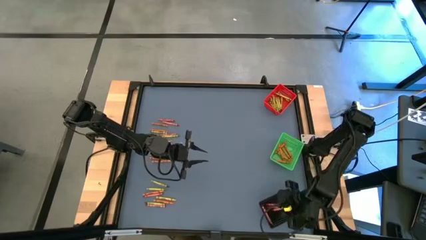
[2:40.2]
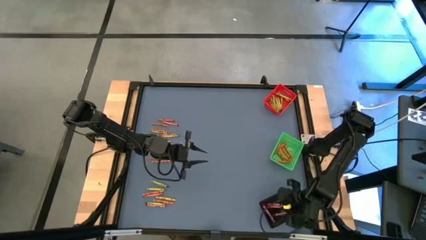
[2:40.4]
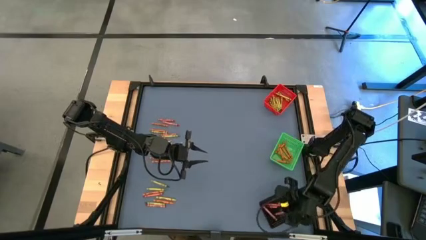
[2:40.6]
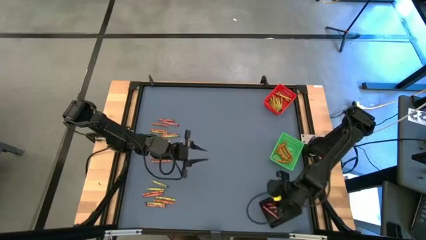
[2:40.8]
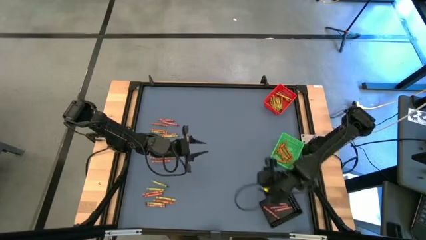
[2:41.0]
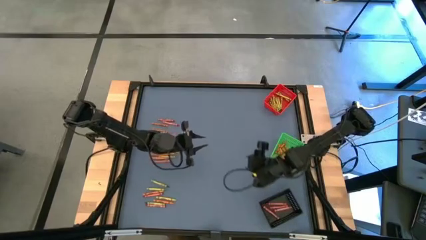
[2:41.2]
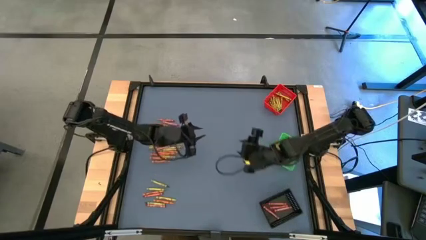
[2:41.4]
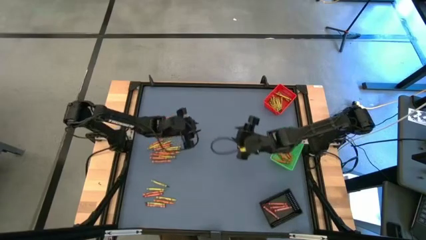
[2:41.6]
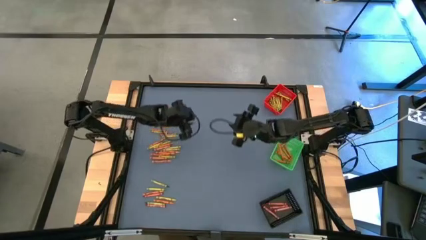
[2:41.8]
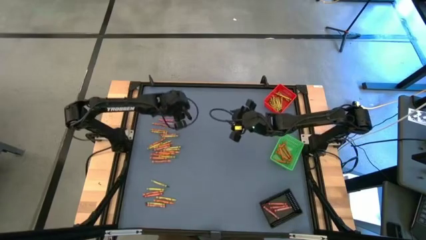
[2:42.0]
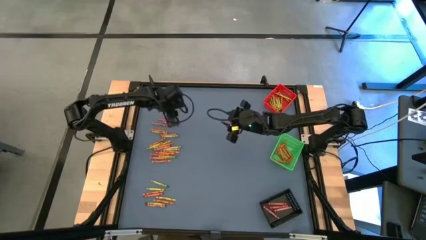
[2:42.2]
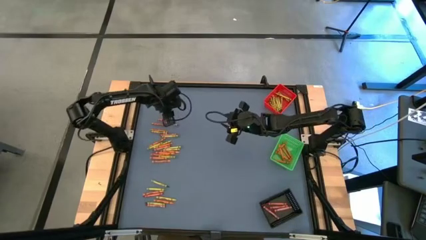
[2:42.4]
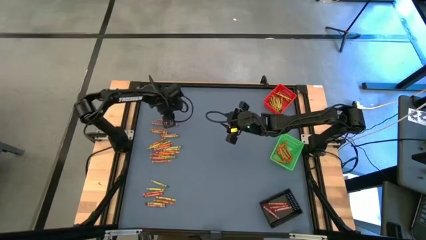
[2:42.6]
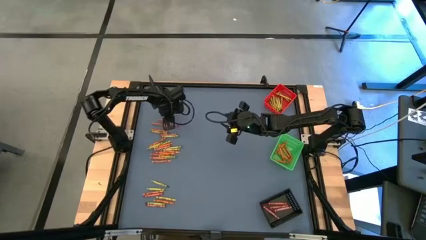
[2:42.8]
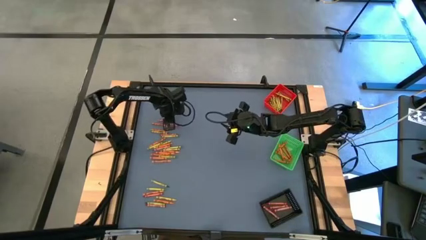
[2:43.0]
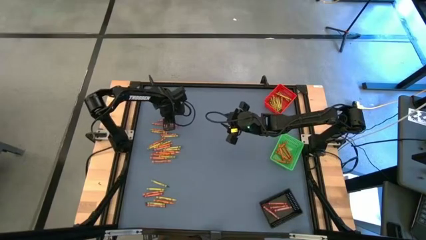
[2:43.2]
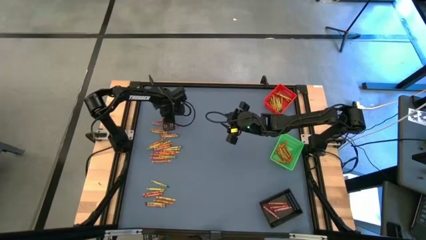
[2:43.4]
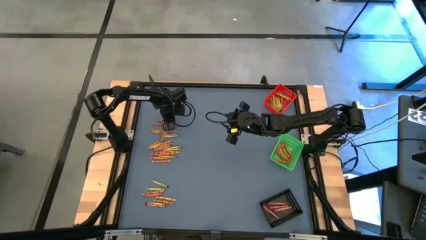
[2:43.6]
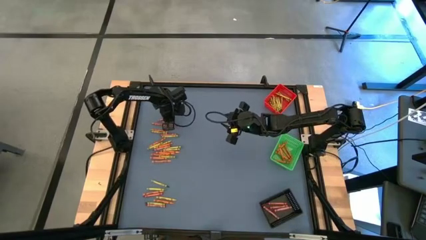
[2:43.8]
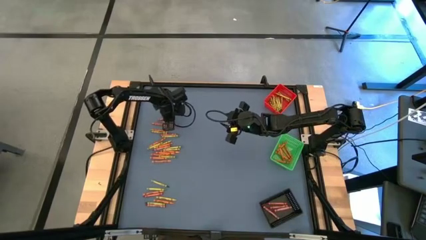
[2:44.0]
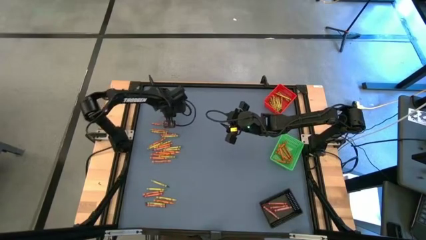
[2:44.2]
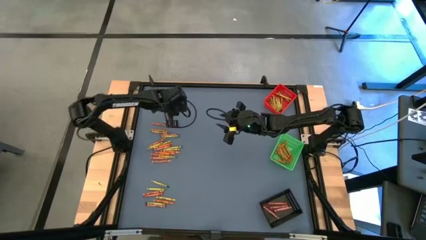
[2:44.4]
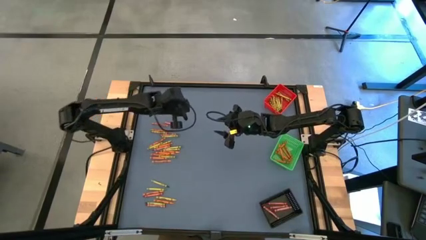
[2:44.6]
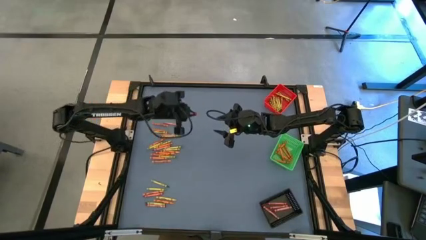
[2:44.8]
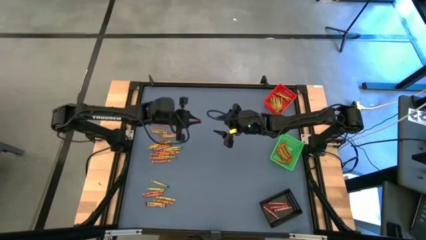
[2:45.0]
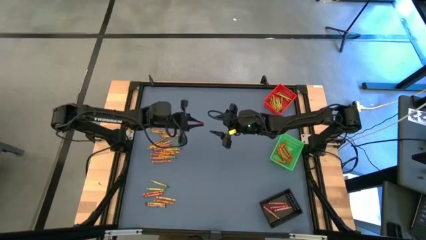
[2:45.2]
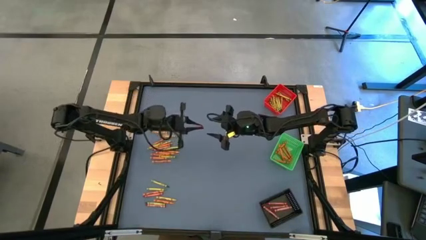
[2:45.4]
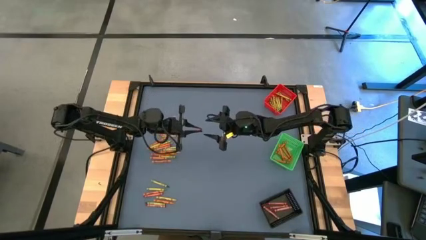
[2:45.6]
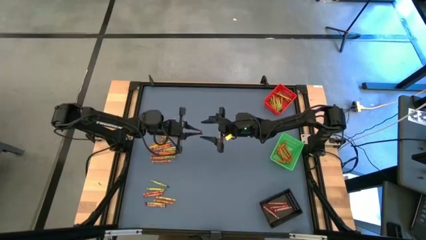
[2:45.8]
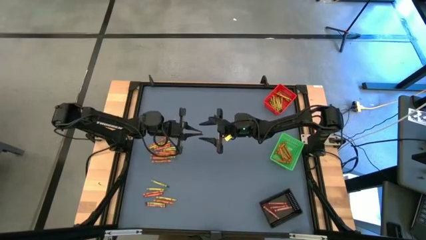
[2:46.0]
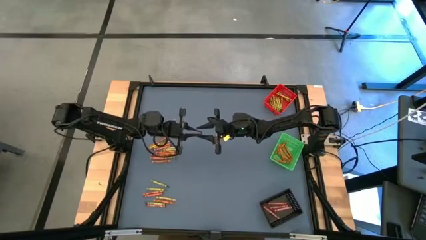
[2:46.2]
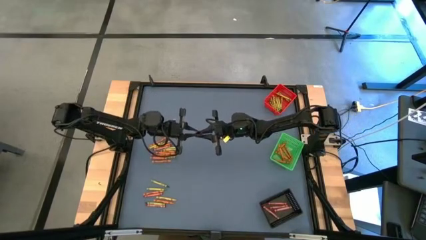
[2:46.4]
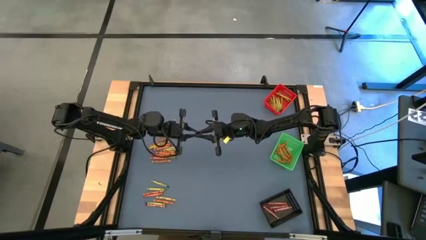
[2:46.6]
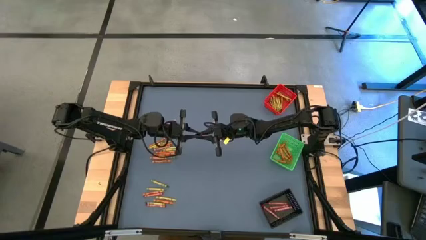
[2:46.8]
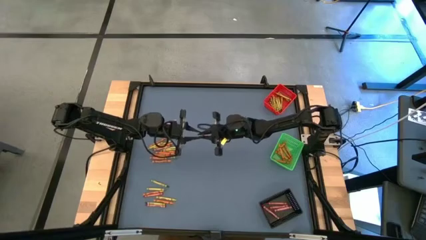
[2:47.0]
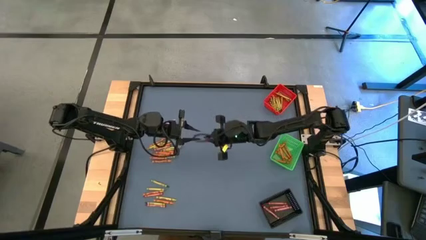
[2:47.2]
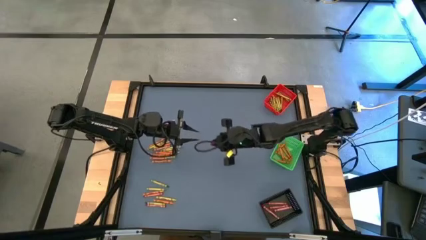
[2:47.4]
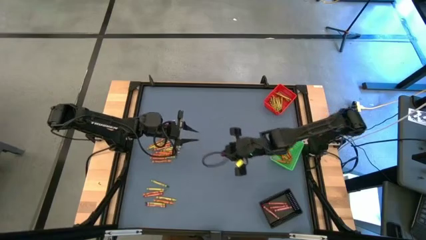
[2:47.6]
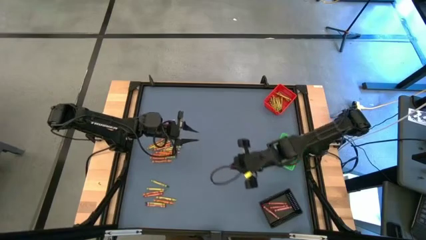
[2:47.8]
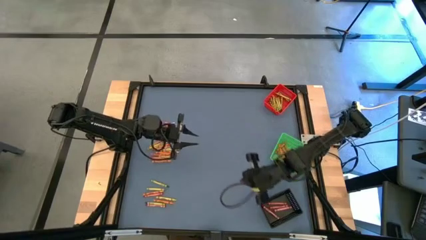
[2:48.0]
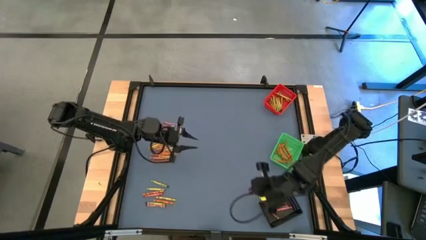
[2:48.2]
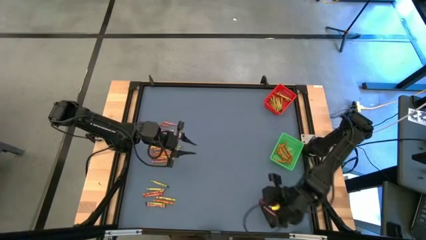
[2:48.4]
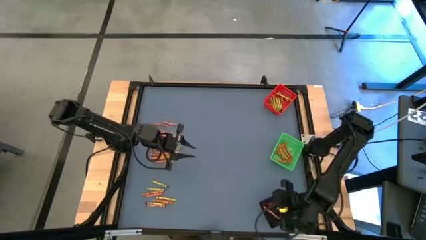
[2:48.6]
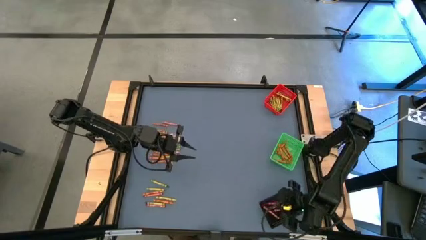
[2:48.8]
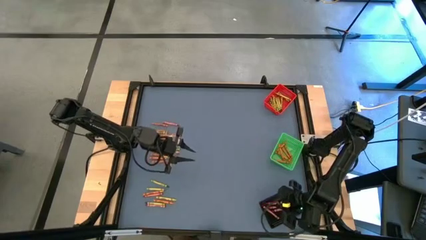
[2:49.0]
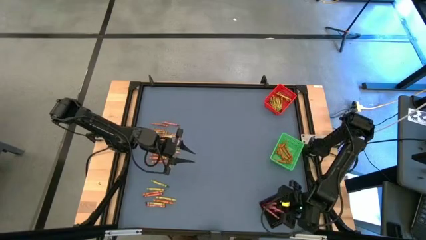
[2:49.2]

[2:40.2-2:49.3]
Task: Sort crayons
Put the red crayon into the black bin

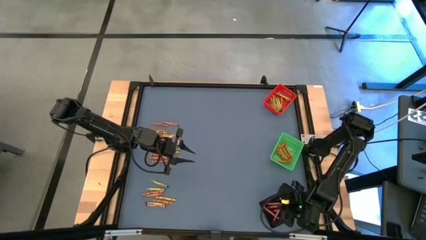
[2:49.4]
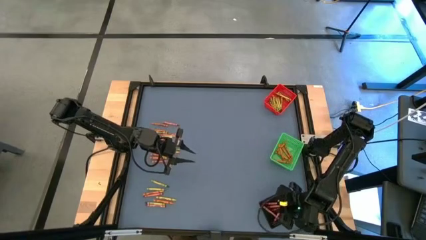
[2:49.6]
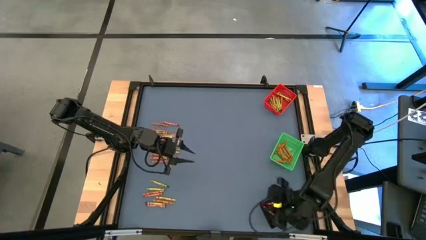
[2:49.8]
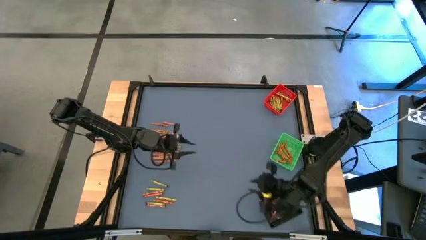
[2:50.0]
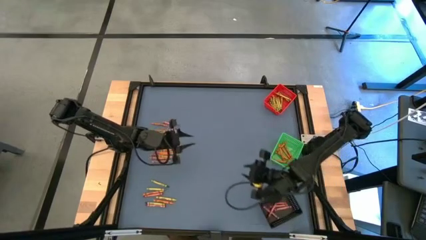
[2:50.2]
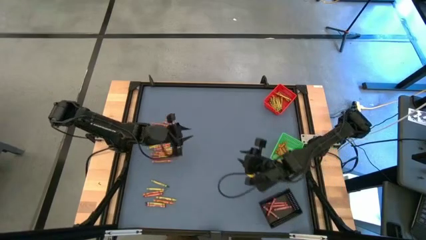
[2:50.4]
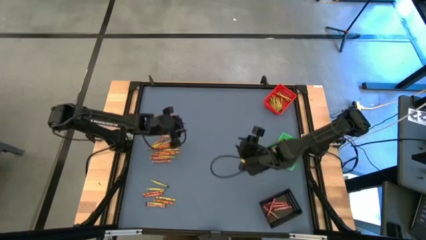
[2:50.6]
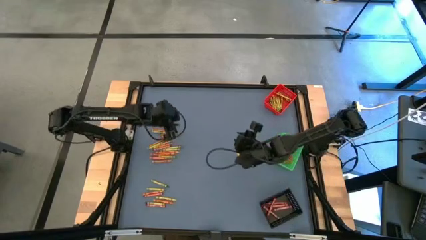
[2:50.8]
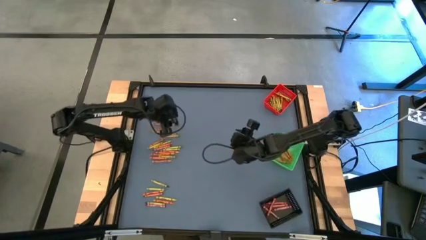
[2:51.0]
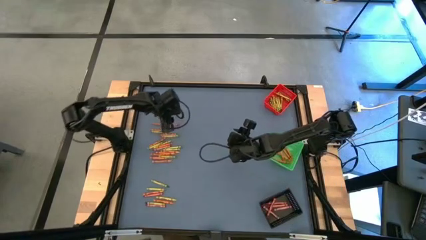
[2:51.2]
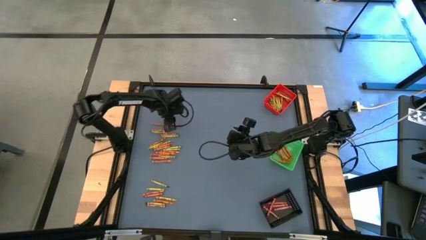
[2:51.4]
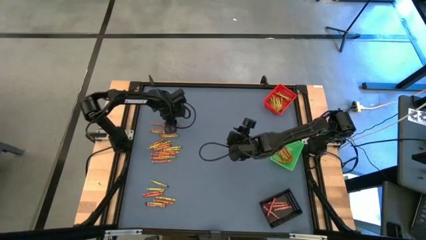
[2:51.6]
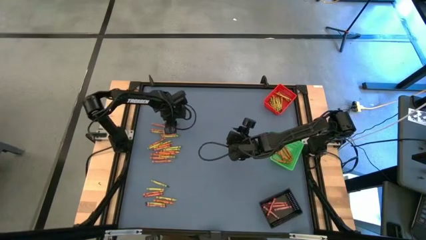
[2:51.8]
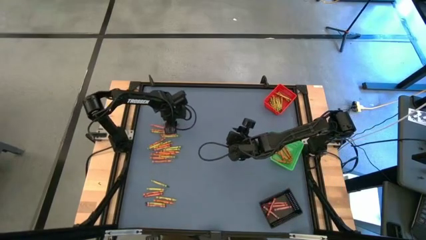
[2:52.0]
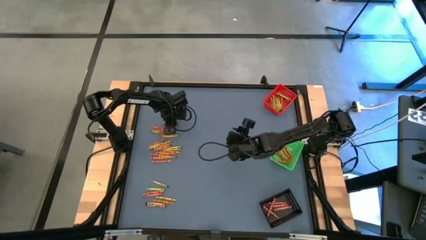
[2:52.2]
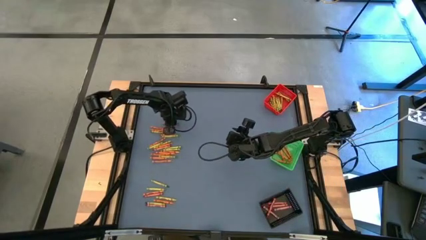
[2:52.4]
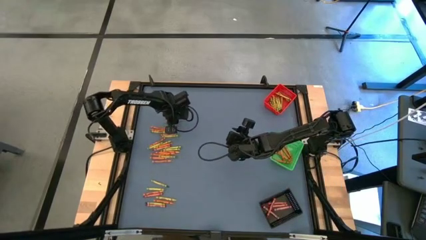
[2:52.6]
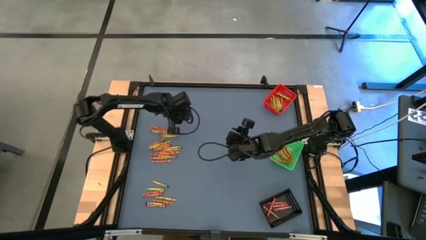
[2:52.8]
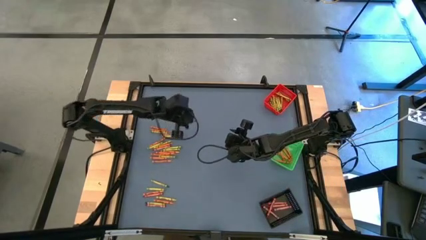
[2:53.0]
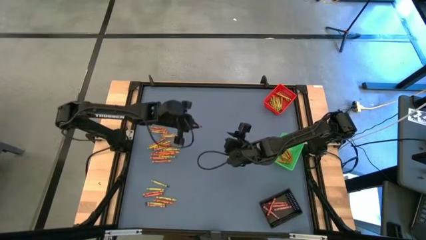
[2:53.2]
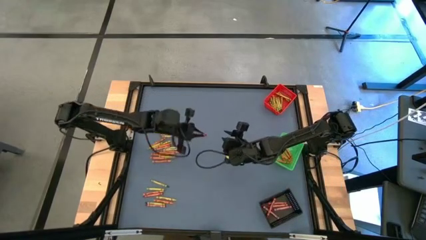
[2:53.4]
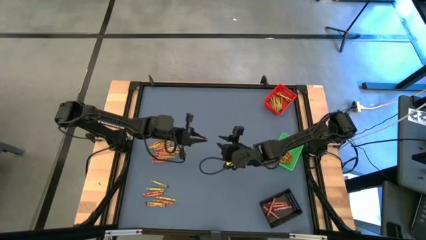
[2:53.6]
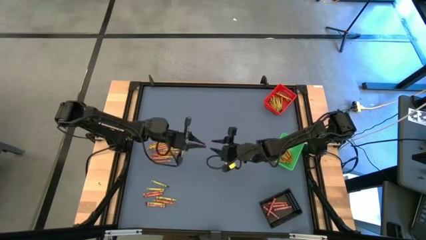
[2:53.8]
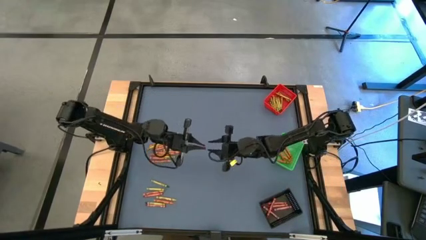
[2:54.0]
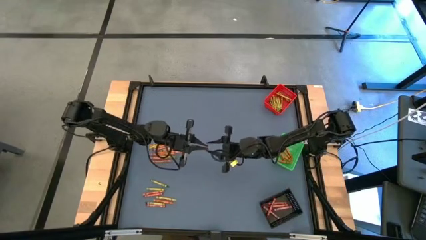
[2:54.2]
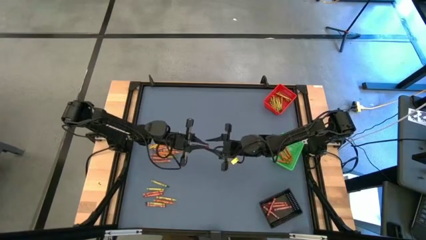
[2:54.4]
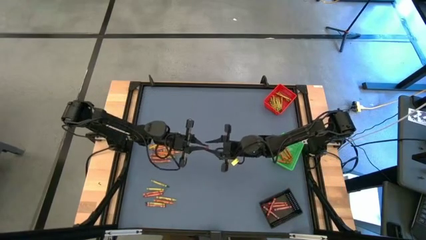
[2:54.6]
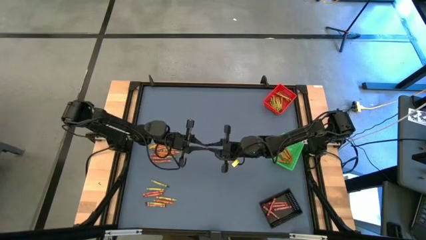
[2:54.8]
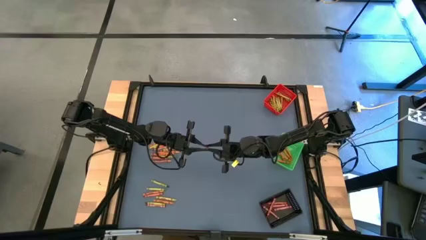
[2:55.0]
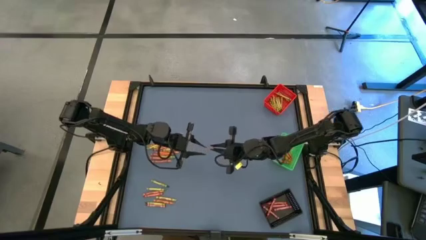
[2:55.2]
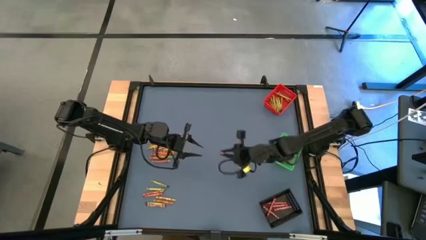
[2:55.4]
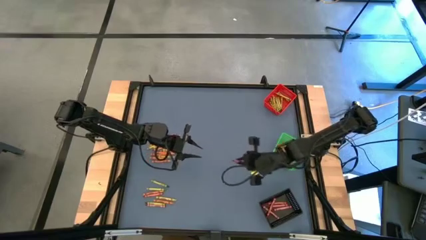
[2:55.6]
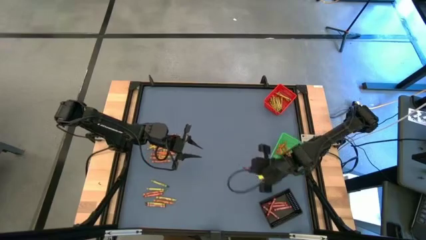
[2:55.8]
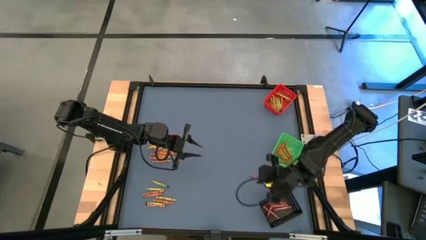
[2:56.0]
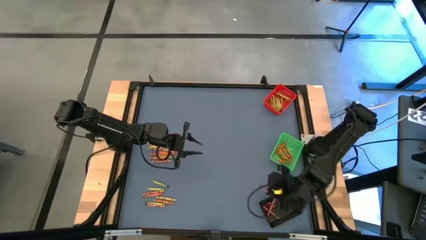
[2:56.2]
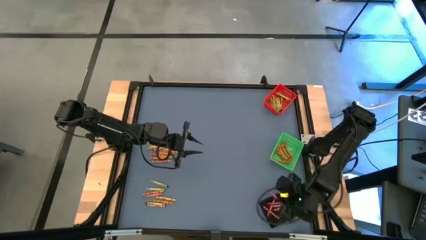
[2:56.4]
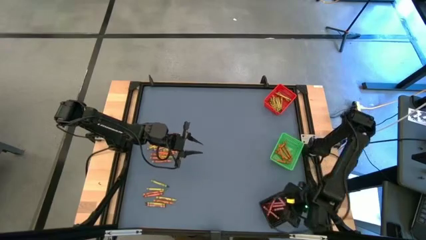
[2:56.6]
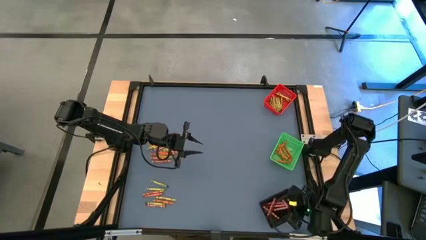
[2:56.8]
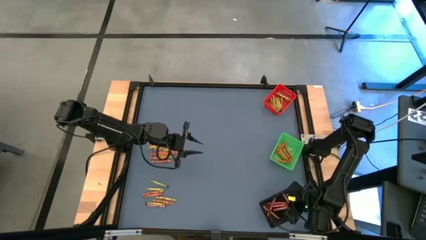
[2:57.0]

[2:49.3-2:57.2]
Put the red crayon into the black bin
